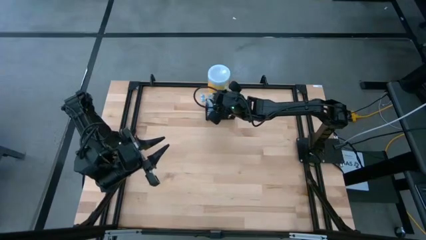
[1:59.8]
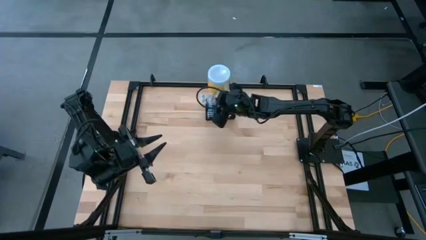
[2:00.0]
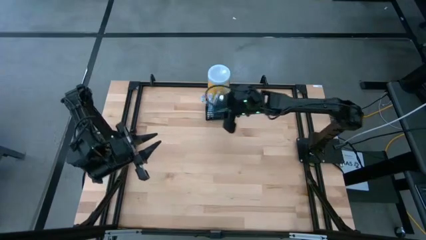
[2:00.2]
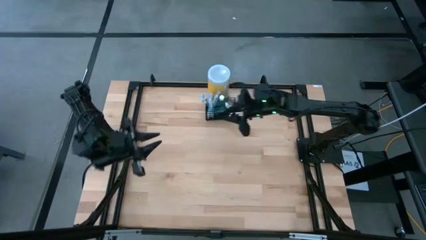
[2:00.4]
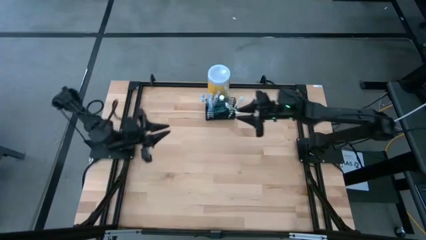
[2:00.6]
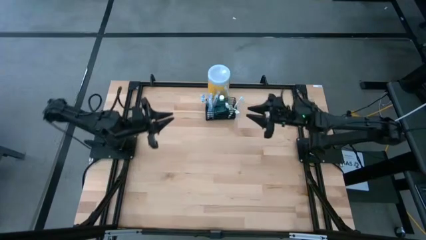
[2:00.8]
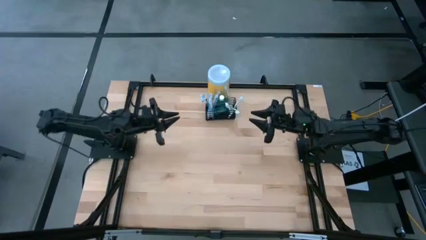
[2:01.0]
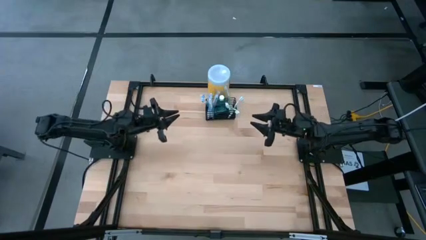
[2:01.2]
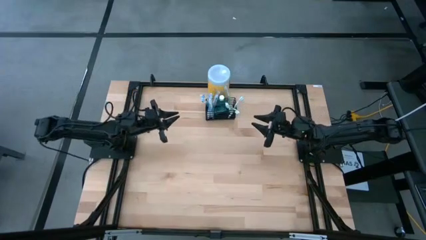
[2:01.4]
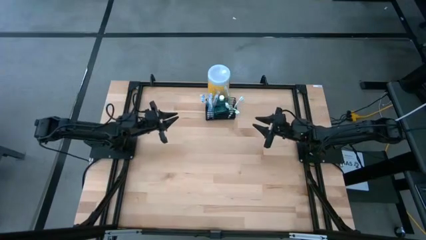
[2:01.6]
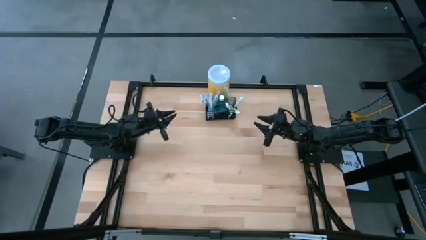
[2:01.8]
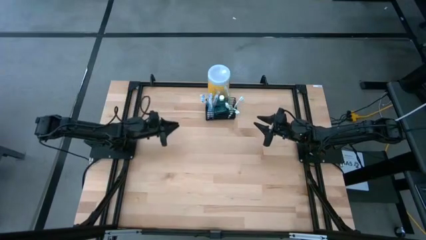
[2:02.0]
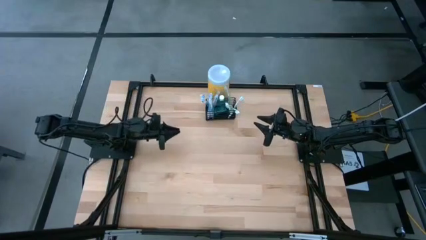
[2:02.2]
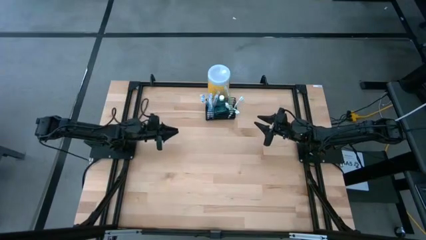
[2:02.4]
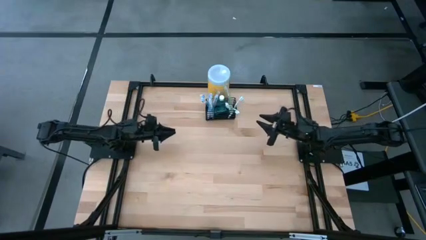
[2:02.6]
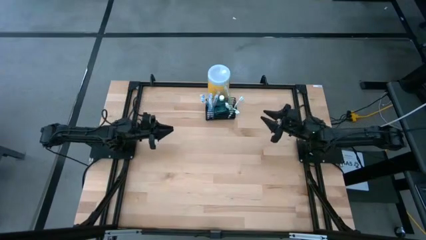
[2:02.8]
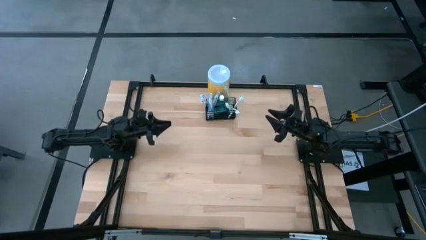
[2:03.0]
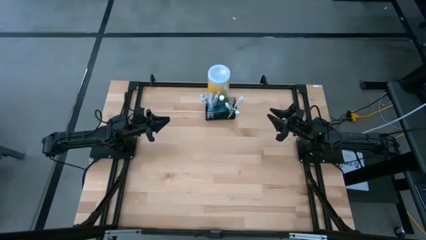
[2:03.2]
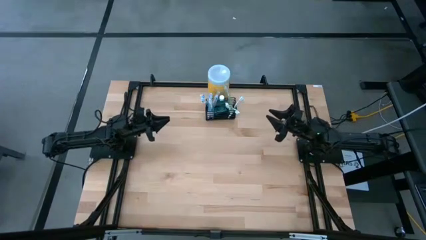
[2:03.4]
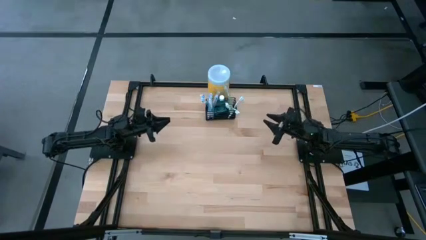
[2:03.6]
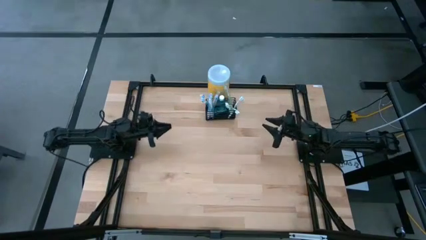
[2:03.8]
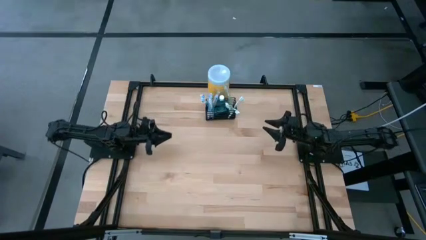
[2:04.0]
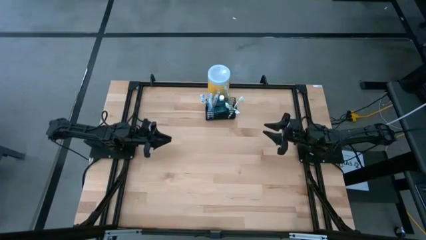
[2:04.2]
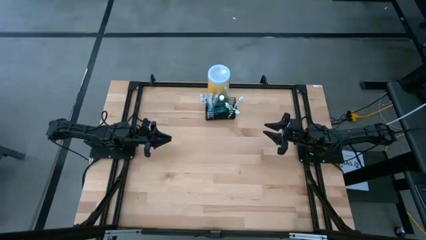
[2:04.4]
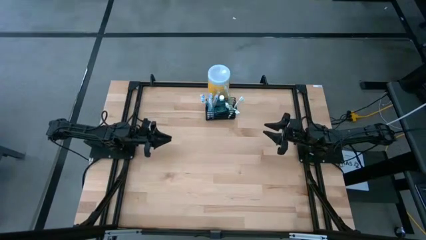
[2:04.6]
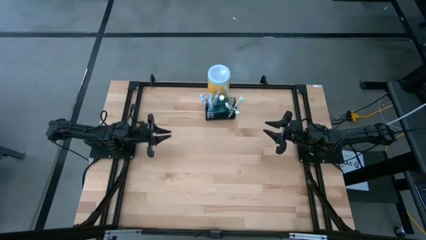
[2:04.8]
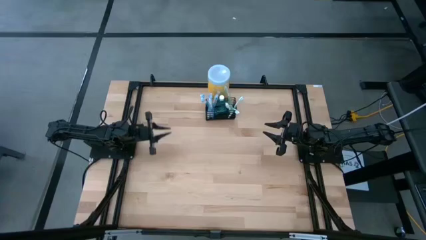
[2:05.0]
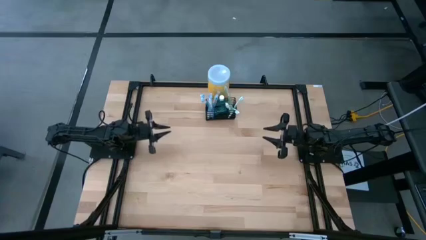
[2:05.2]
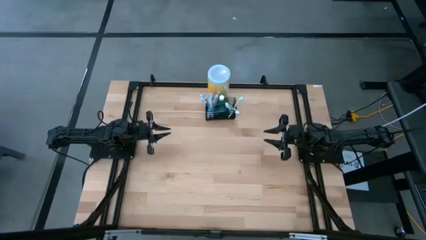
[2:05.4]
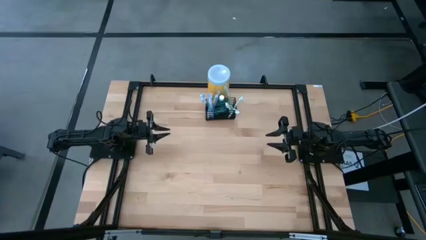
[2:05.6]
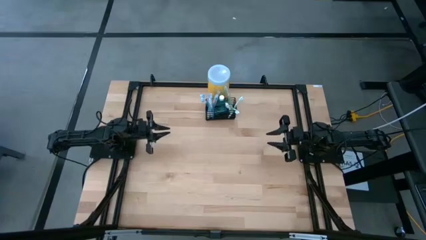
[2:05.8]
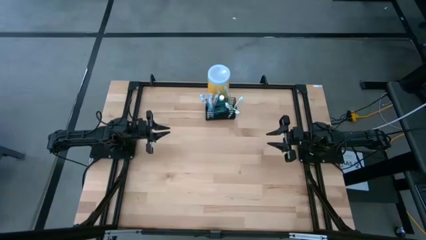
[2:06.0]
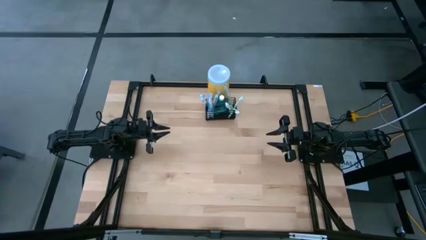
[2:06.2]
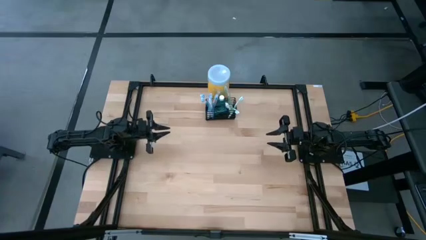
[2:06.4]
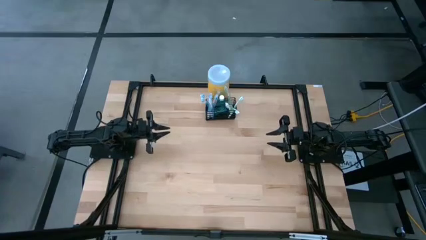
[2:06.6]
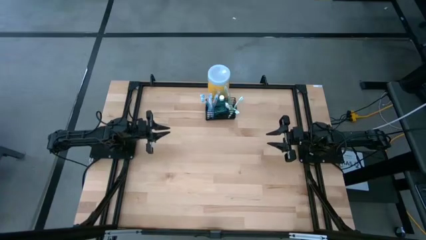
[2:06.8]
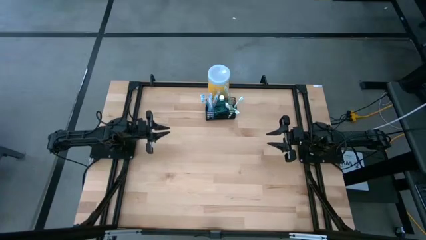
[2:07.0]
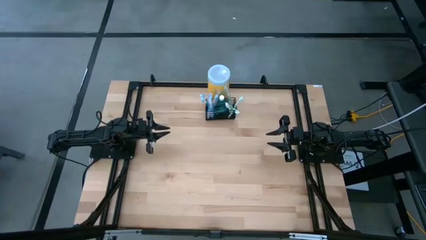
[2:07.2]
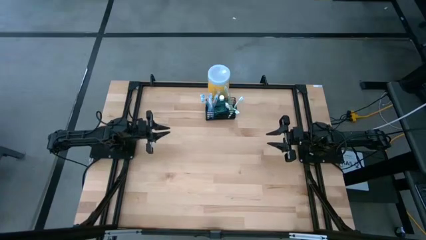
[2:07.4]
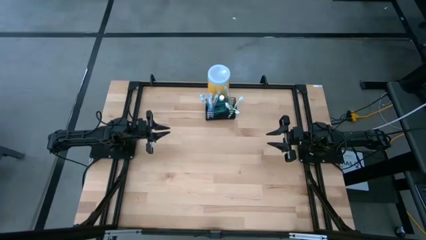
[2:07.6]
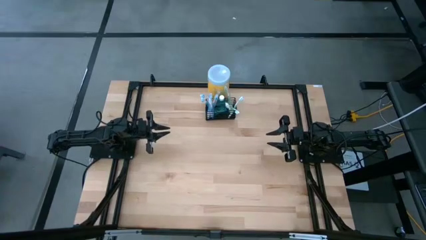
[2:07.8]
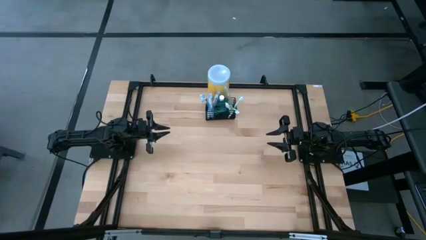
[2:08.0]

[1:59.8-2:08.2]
Task: Pick & Place toothbrushing station
Return to Home Position

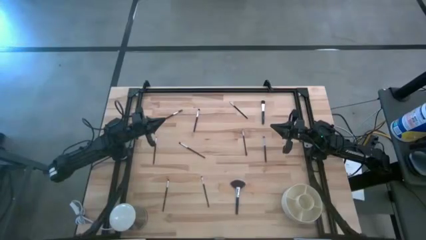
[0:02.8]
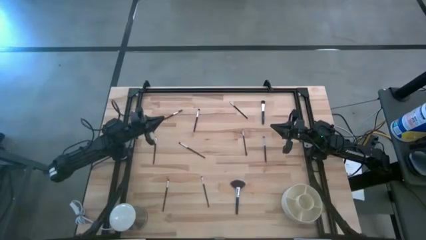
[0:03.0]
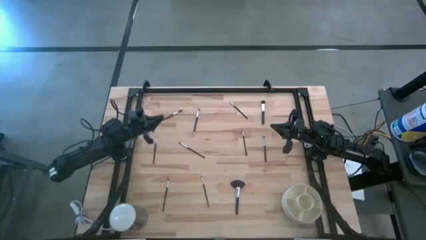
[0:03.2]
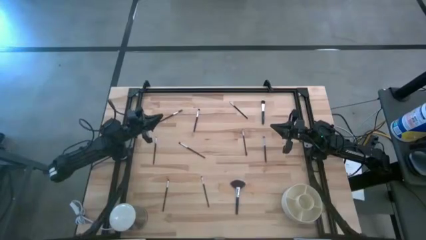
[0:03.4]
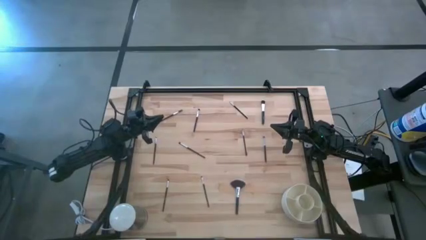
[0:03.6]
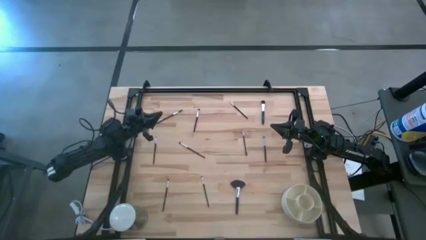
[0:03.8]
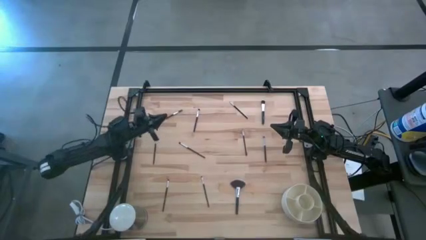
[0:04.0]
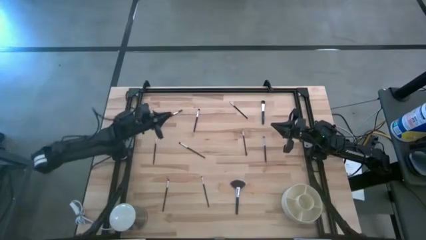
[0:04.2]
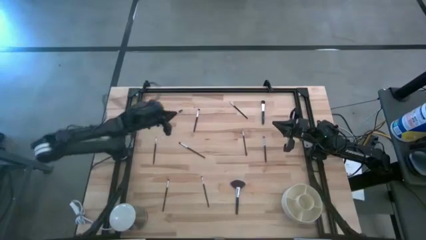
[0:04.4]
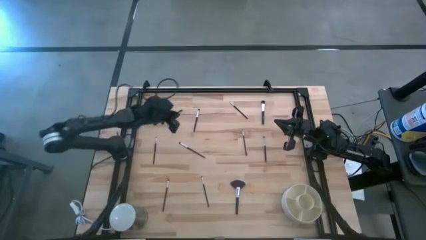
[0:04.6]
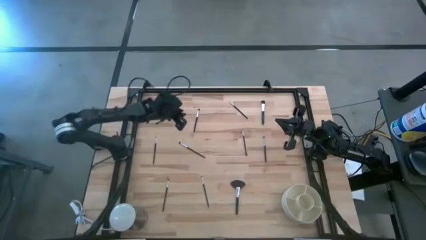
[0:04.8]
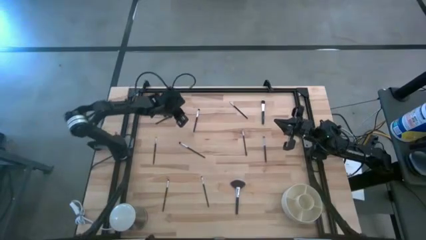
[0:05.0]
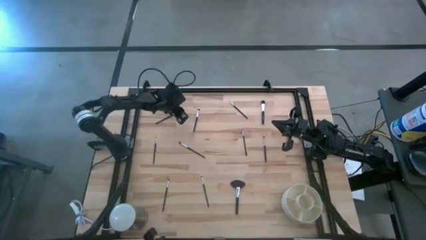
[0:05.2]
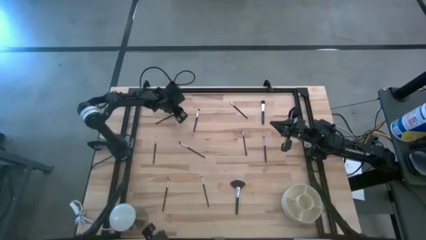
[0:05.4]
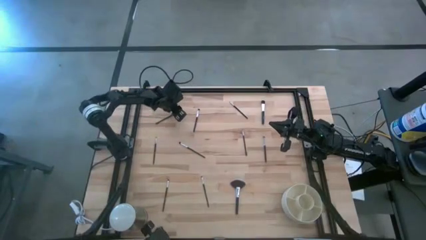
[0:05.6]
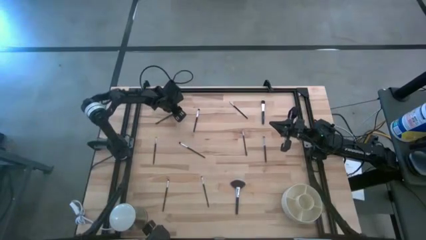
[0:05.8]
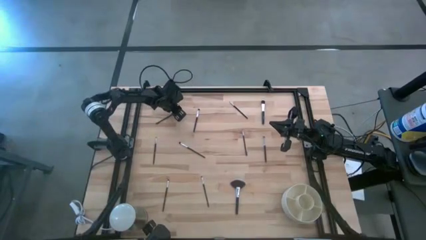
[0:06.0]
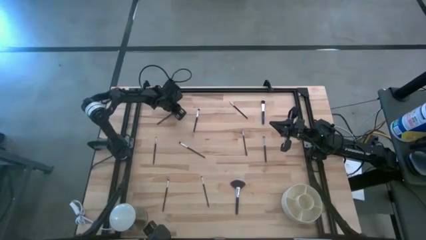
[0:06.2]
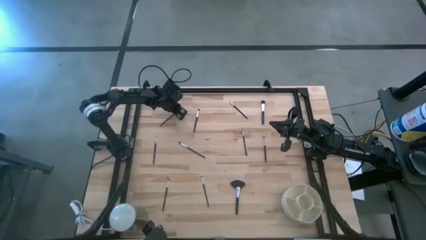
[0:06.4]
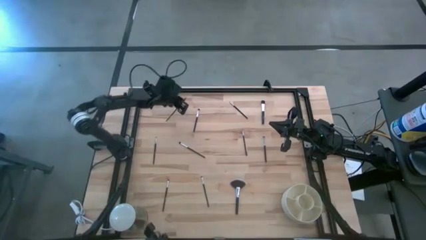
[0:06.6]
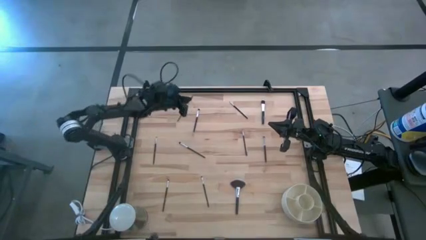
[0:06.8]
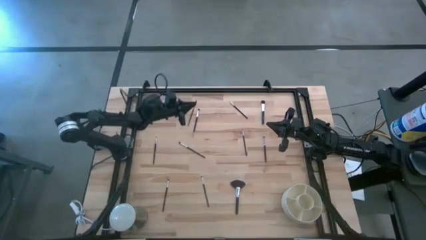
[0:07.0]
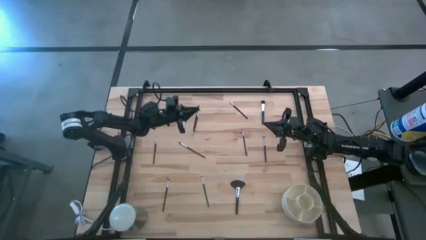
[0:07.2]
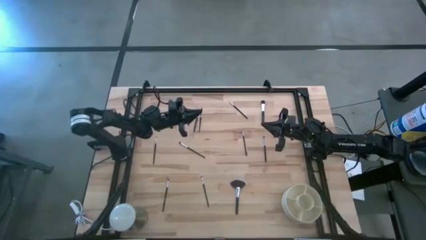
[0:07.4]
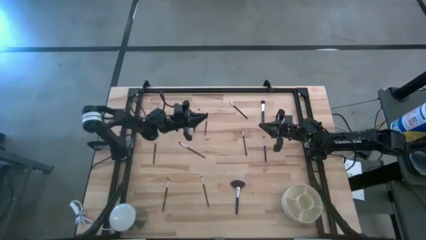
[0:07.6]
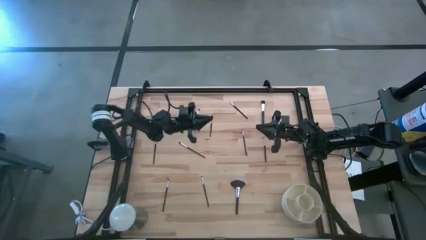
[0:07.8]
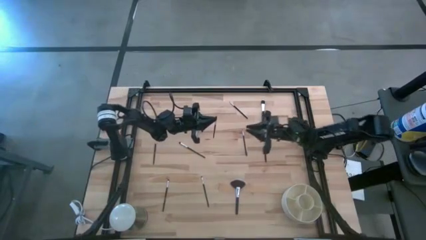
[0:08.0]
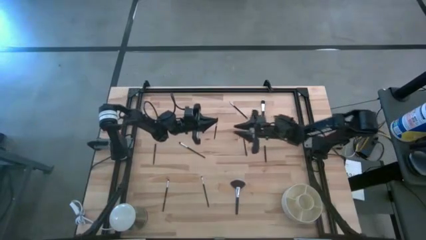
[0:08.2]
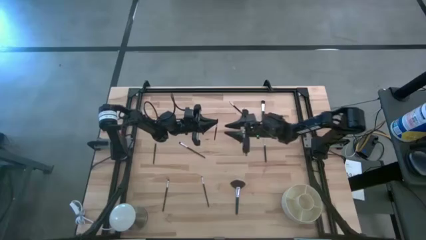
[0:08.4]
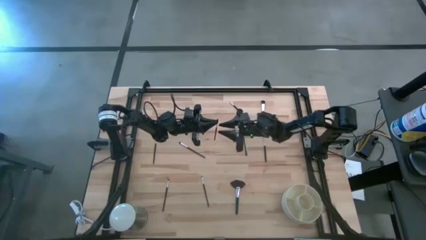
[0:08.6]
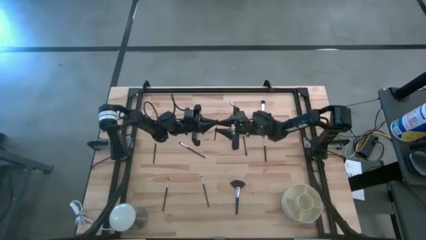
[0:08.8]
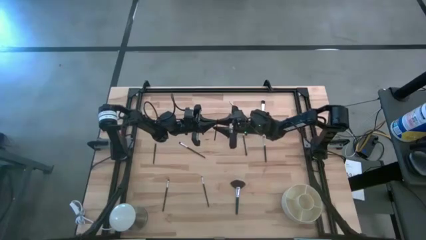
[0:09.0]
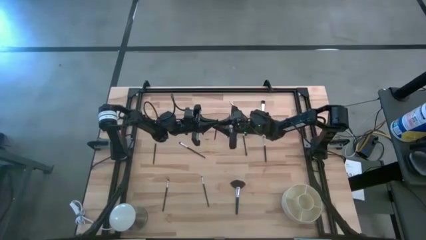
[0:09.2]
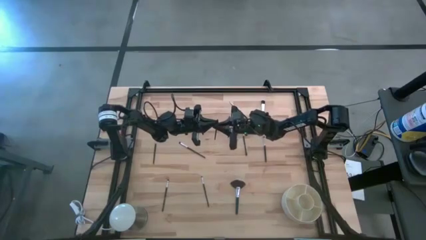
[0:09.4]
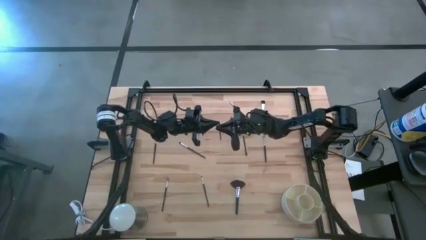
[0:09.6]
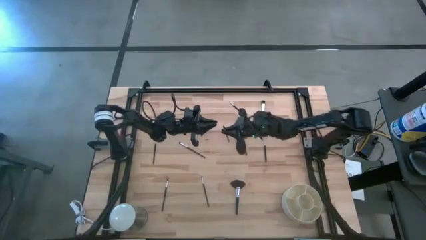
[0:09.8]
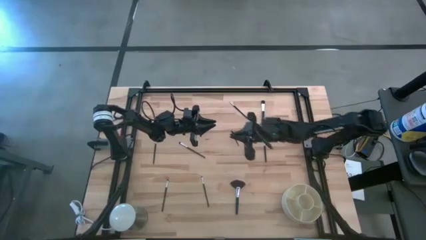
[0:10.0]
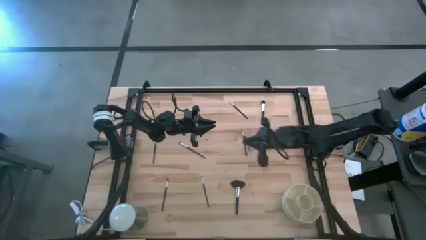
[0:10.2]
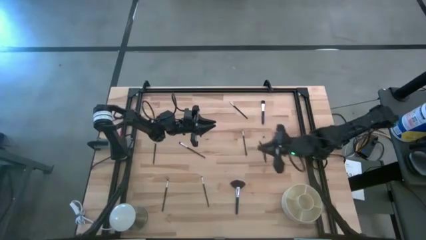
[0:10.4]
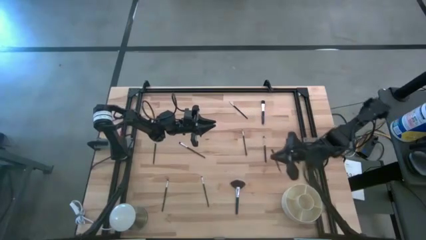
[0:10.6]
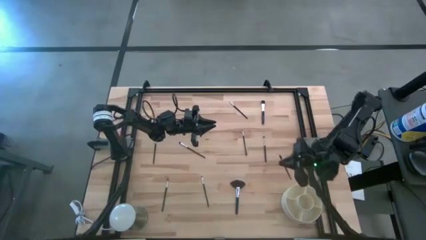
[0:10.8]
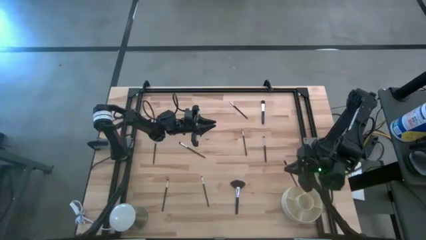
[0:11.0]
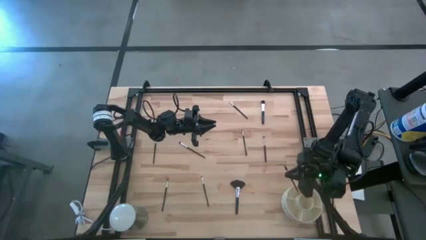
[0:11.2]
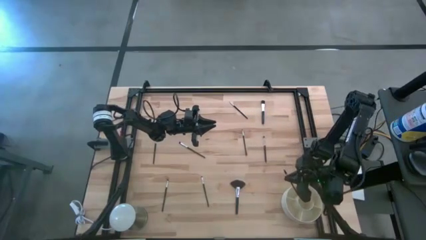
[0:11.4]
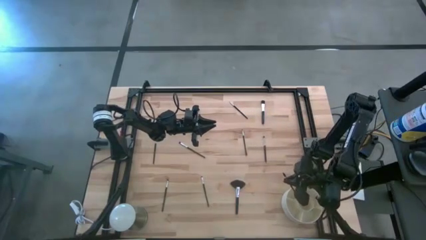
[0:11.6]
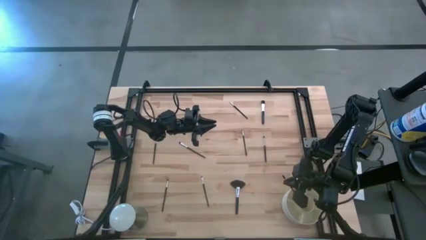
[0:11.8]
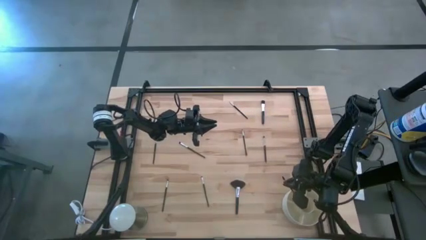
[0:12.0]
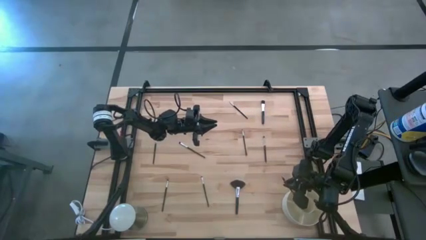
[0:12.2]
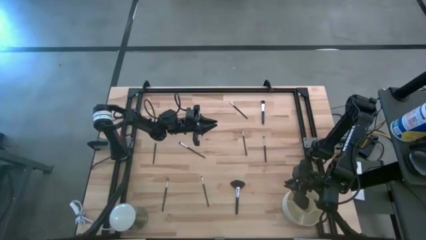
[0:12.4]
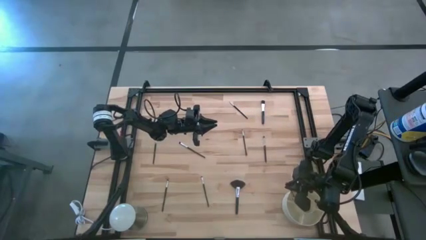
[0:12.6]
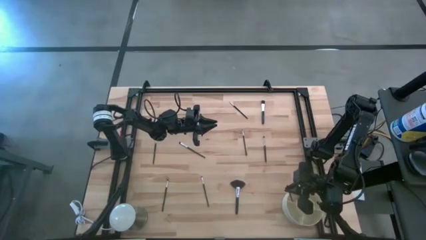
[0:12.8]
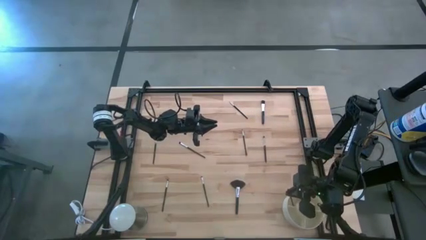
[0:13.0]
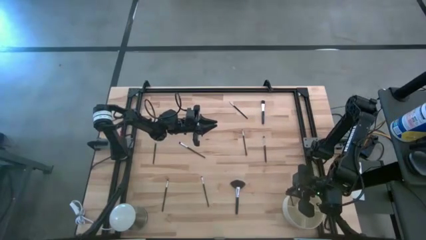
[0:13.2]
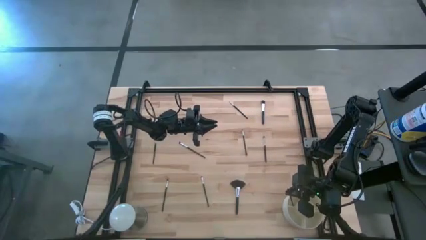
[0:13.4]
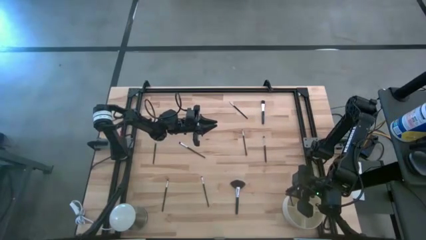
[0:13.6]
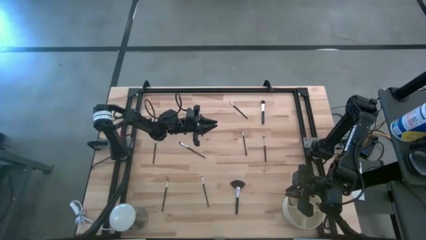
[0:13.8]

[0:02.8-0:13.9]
Task: Put items in baskets/containers
Put the black lash brush into the white organizer
